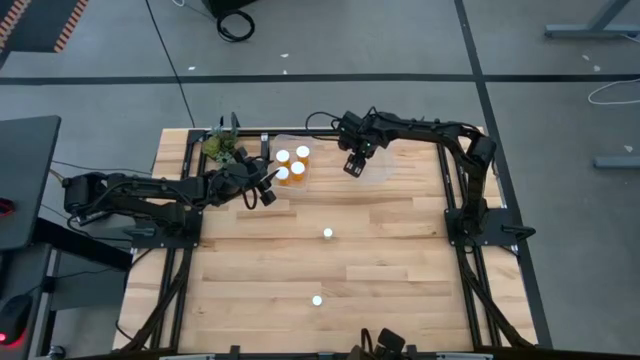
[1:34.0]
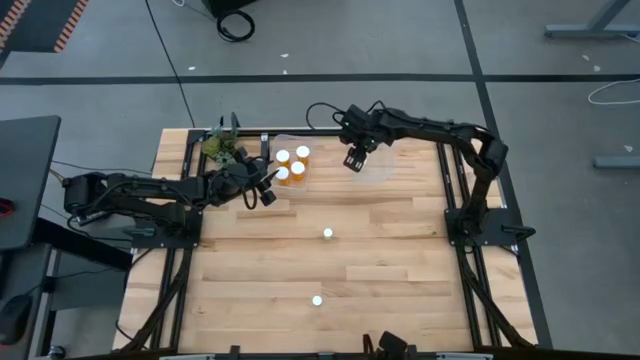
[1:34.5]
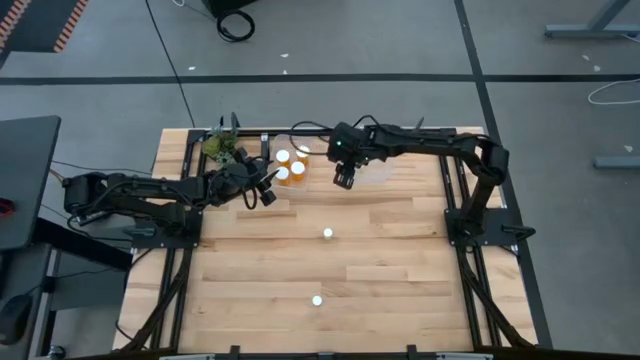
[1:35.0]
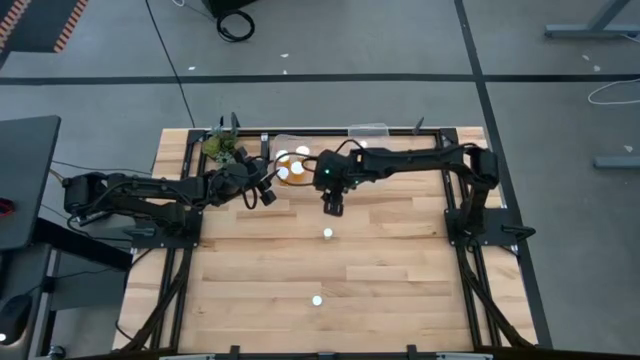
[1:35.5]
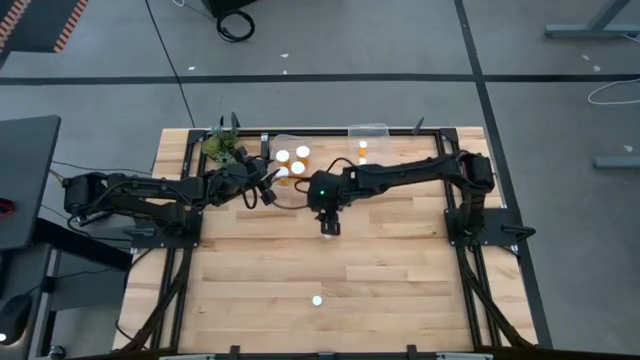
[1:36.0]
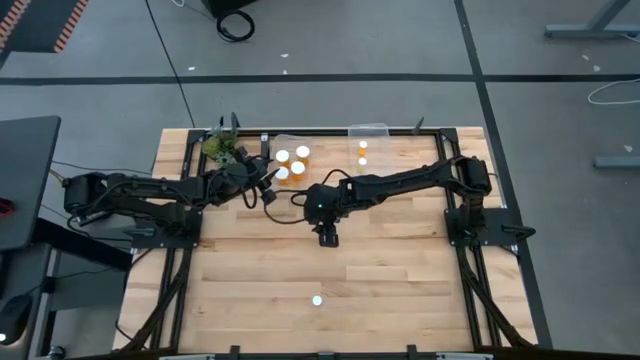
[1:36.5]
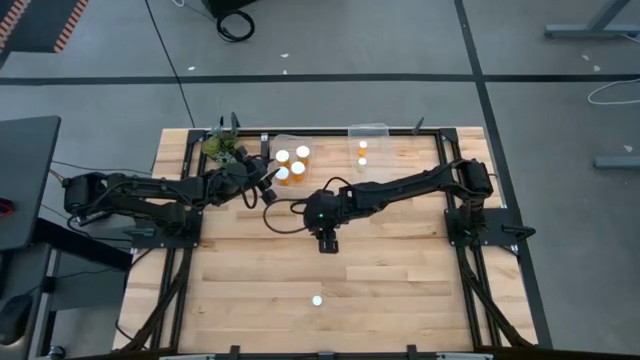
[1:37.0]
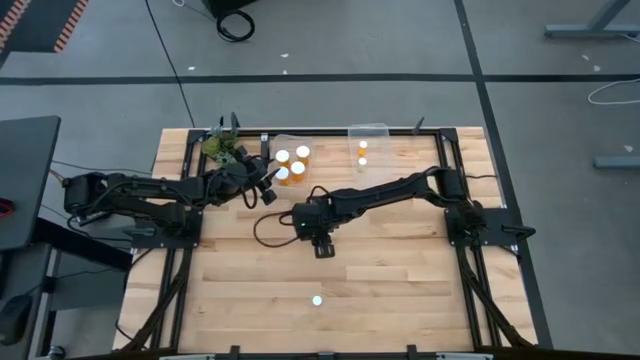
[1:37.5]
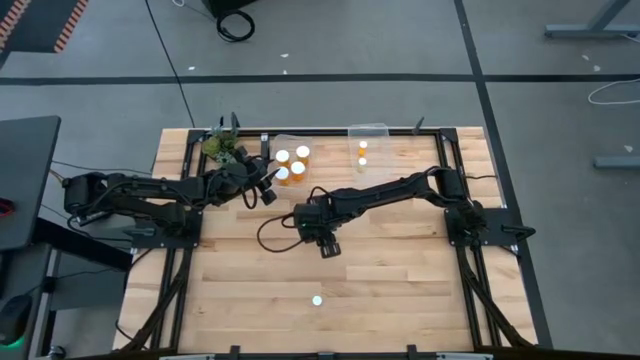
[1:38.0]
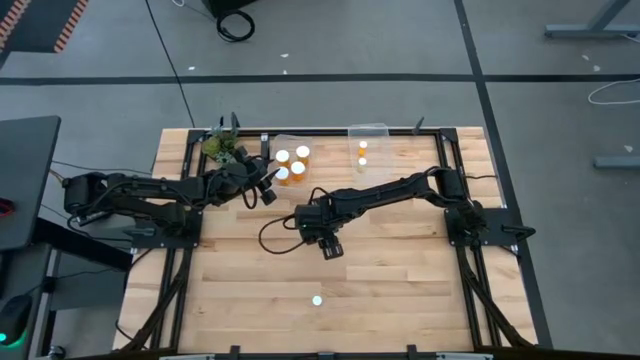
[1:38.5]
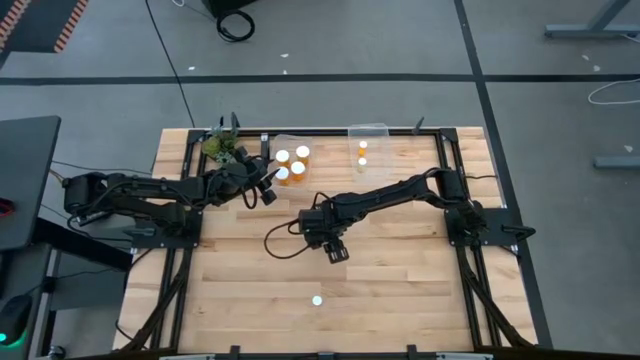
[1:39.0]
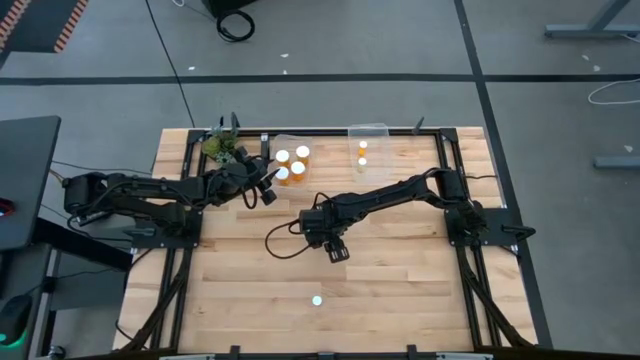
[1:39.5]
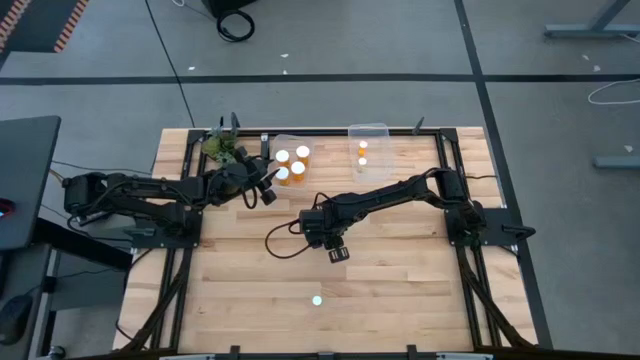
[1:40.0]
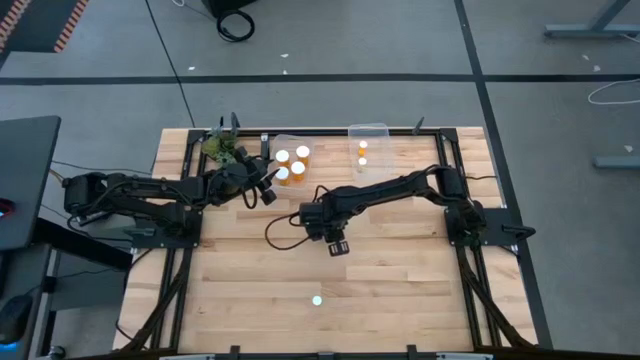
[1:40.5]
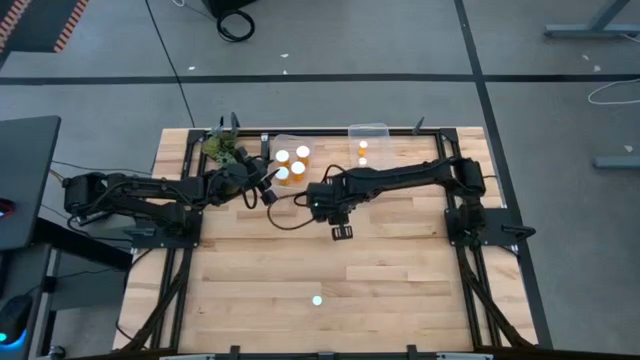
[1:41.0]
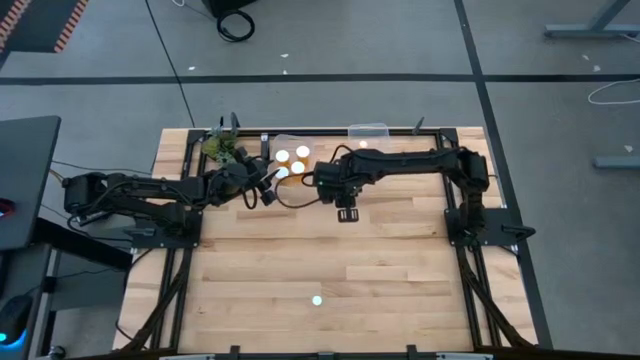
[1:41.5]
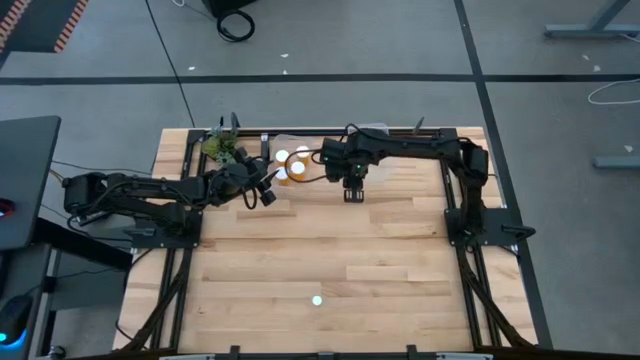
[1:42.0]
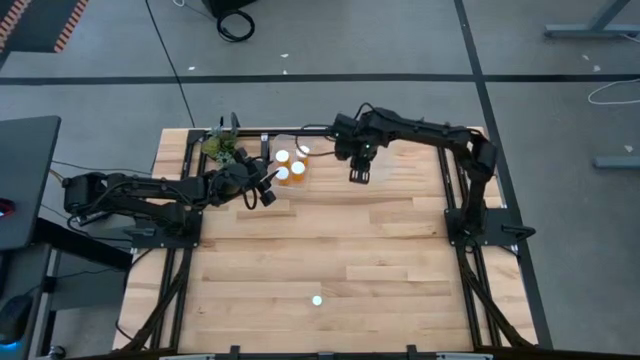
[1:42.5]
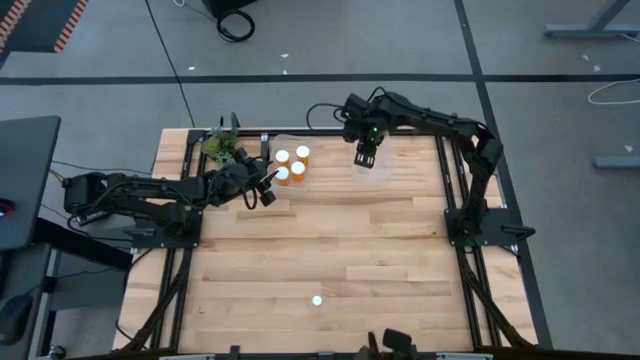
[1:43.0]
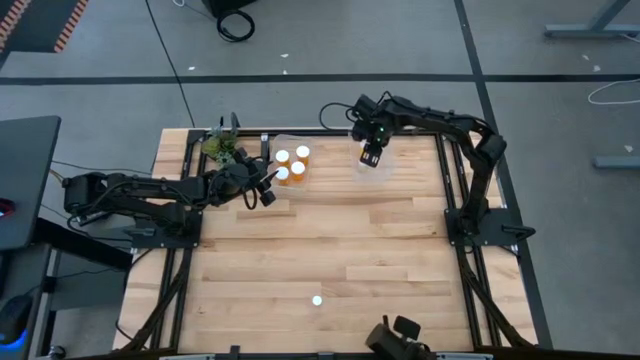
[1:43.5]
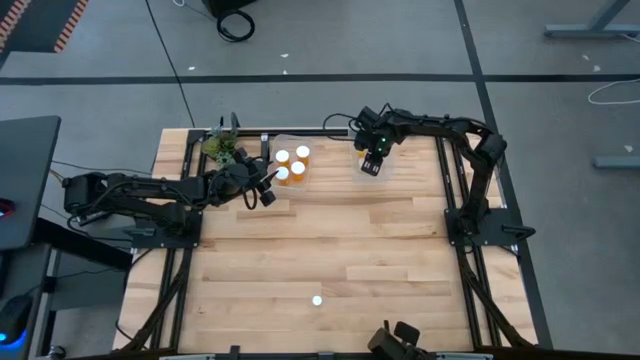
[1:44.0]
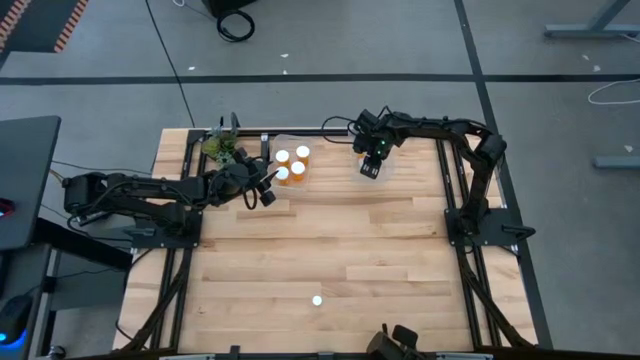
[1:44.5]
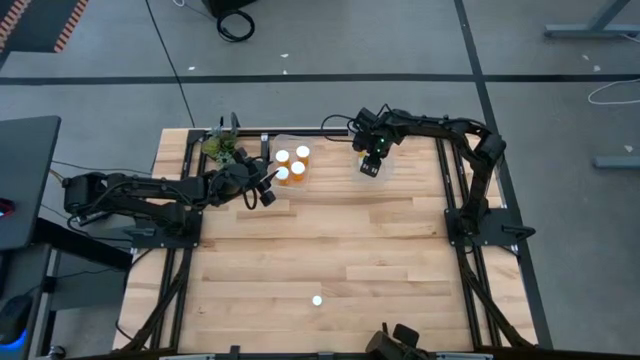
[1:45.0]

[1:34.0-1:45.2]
Task: Pick and place medicine bottles into bin by pill shape (circle, oval)
Put the small yellow pill bottle into the right transparent bin

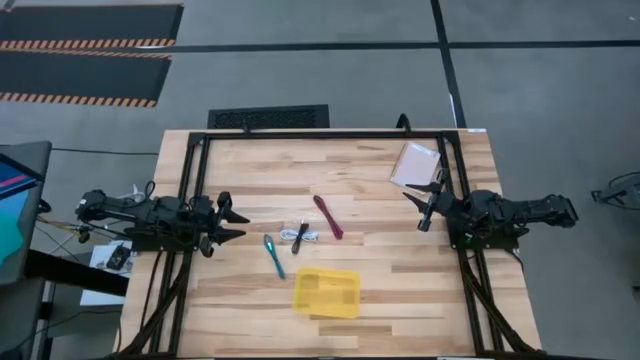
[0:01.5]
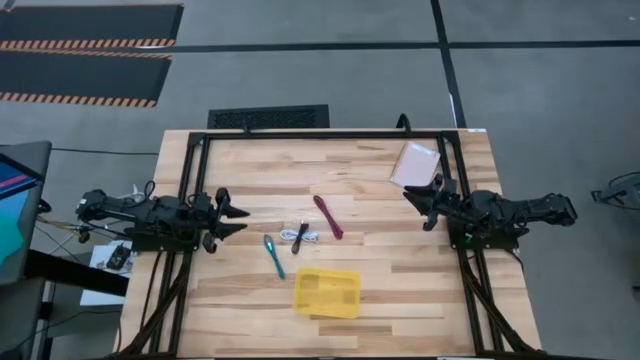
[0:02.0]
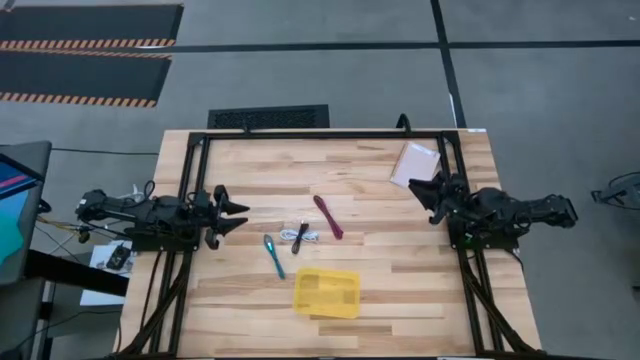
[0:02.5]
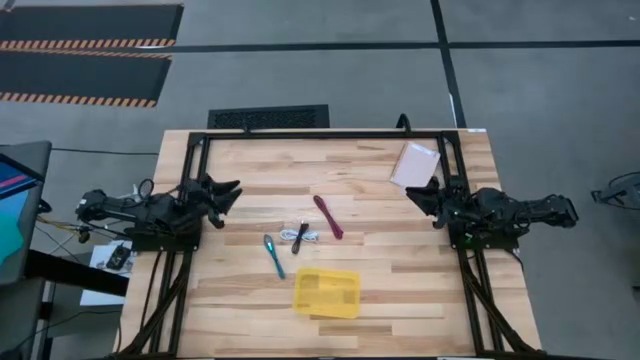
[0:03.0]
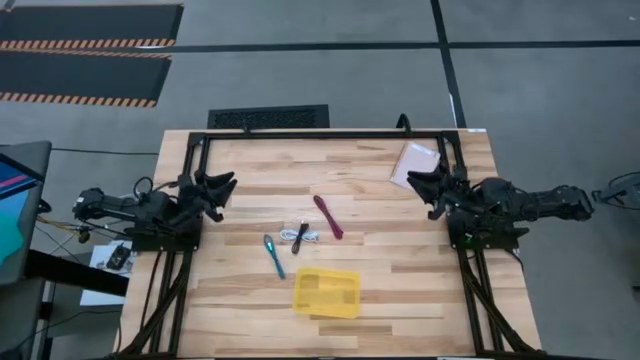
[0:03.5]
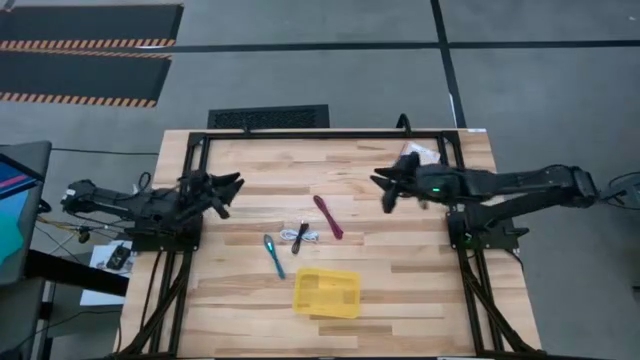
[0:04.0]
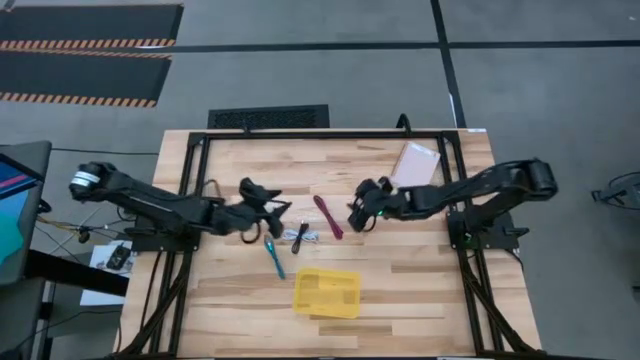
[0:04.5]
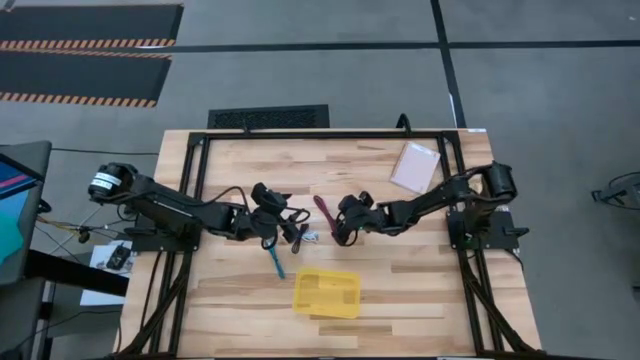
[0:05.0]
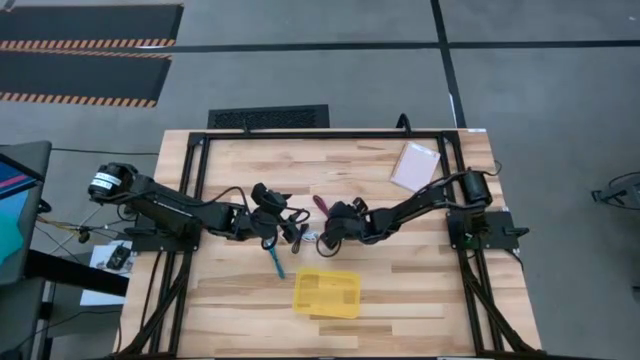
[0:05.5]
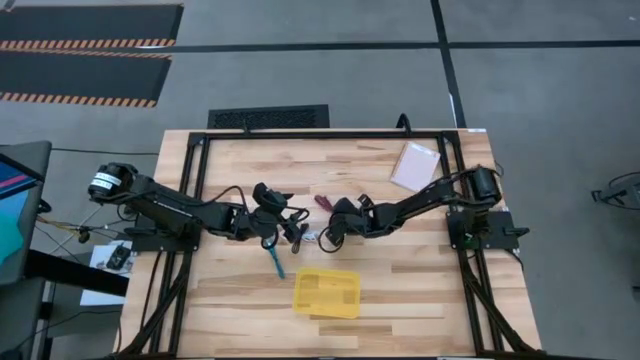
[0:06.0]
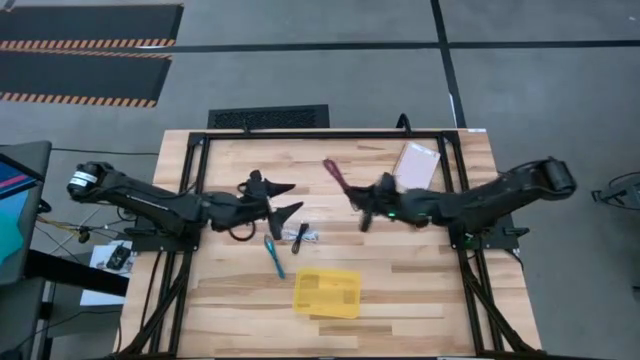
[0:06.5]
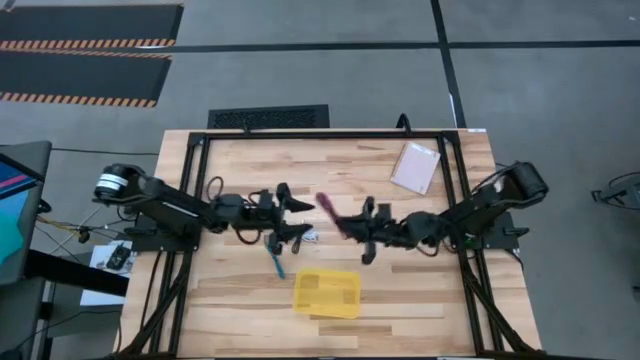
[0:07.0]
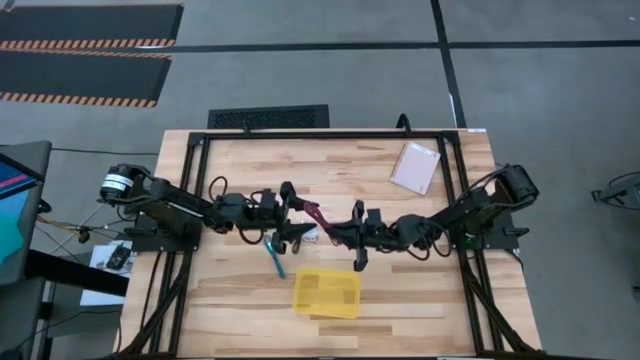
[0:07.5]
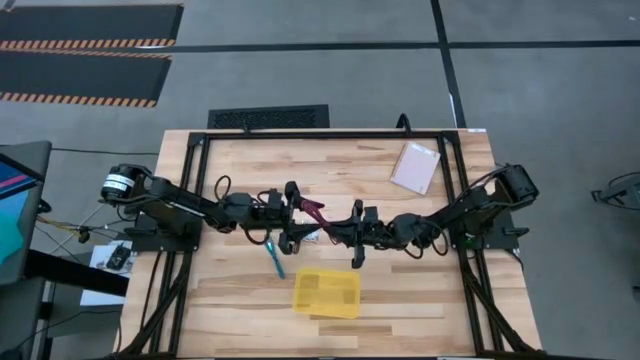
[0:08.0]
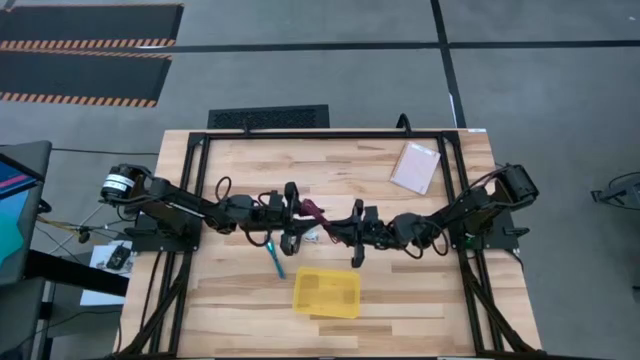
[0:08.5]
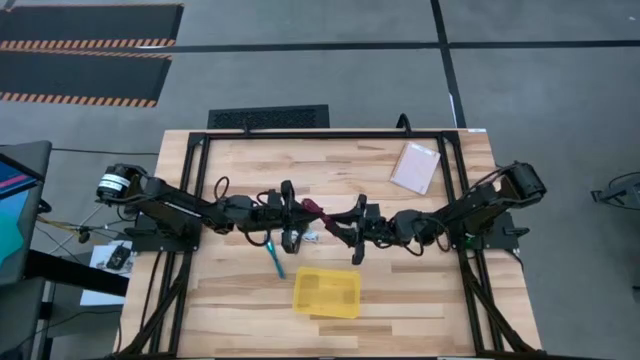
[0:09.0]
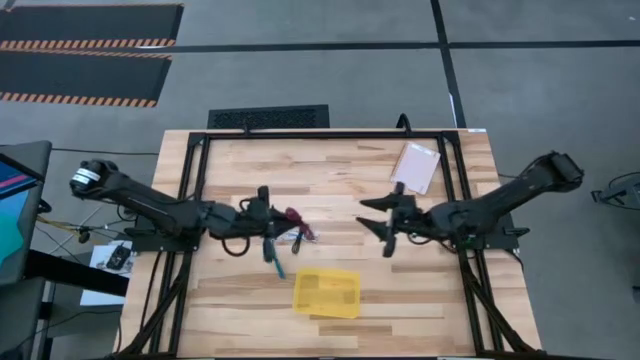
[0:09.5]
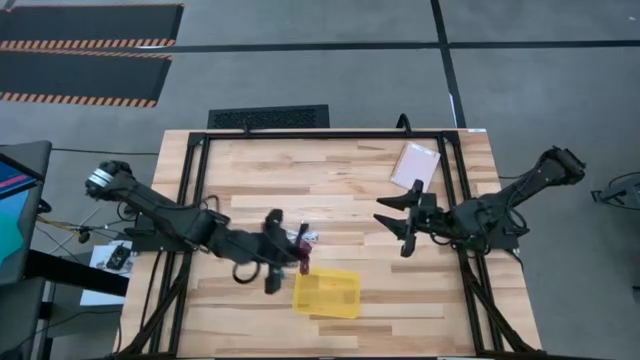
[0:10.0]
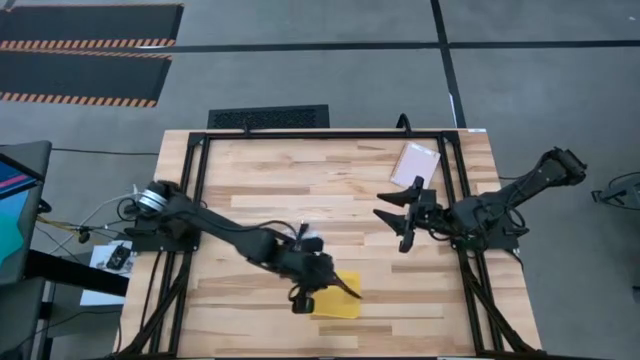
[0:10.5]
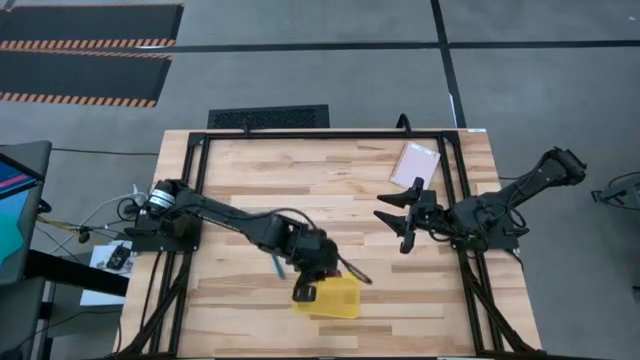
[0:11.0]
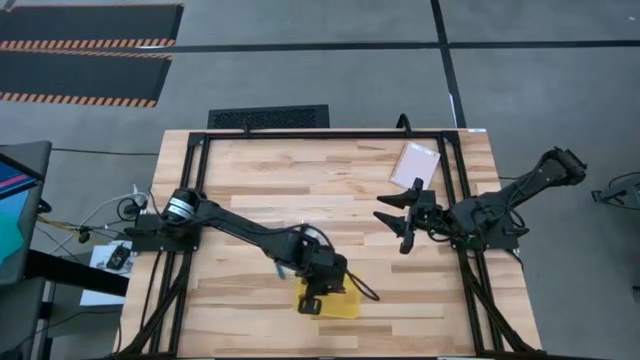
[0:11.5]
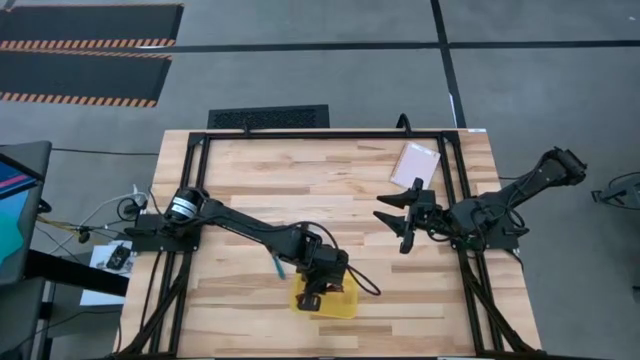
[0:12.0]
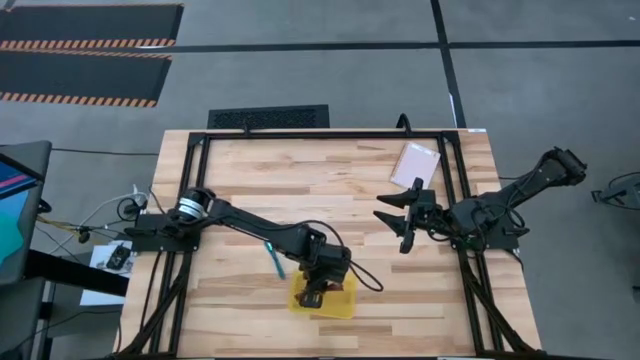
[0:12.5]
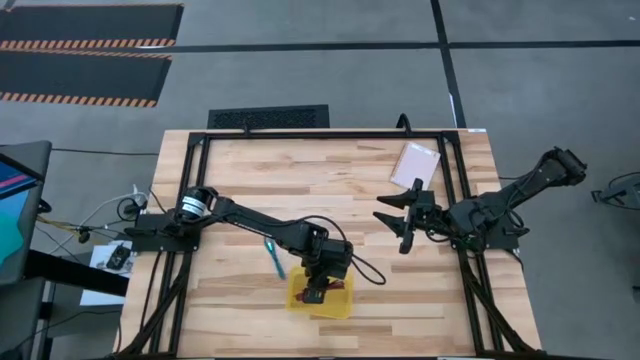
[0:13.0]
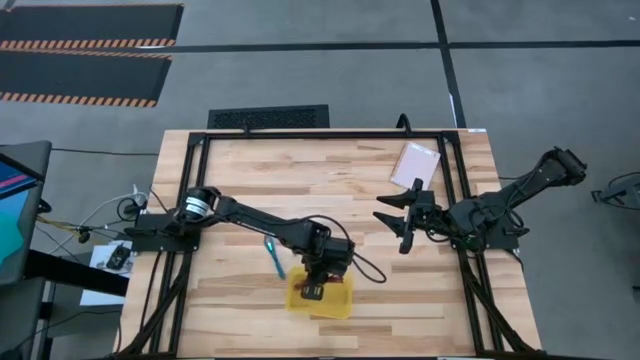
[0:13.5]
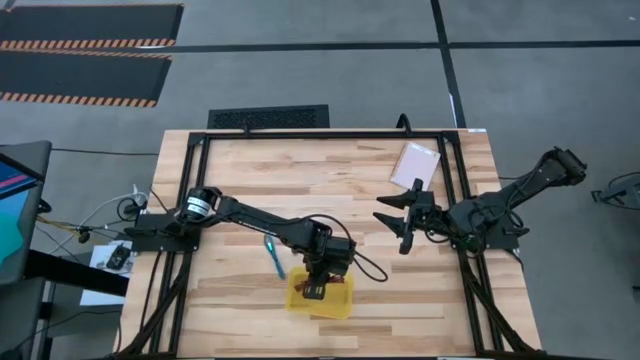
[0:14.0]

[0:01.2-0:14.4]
Task: Pick and place USB-C Cables
Put the pink charger cable into the yellow bin
